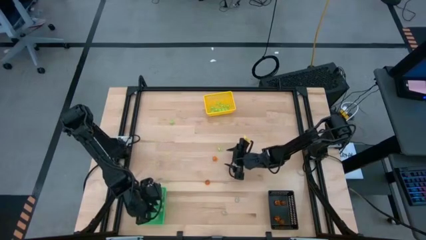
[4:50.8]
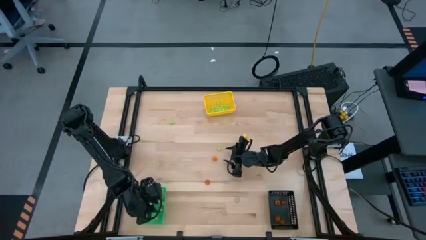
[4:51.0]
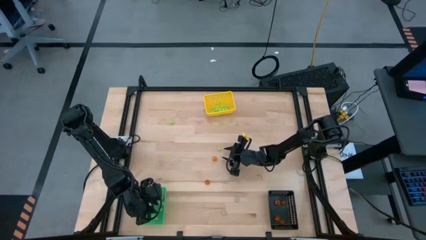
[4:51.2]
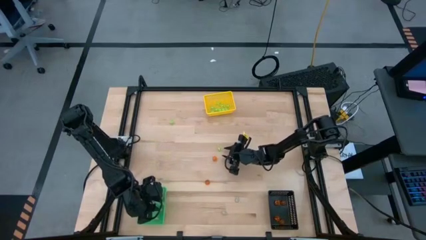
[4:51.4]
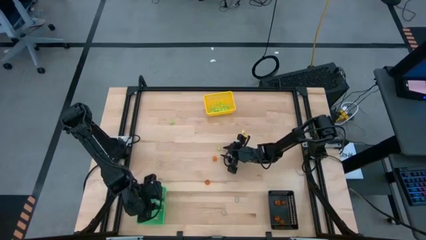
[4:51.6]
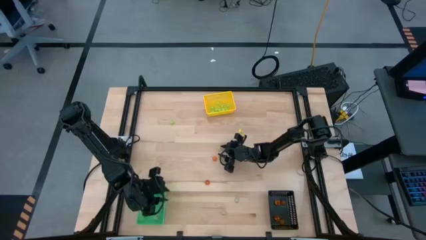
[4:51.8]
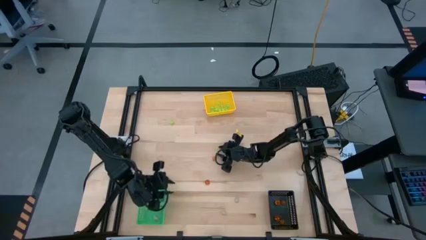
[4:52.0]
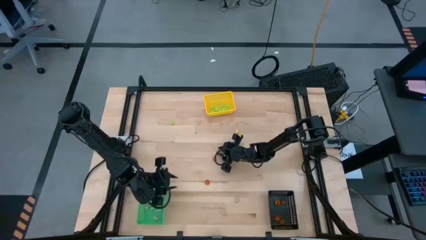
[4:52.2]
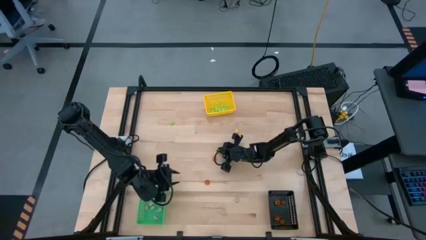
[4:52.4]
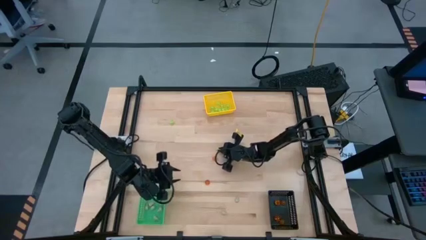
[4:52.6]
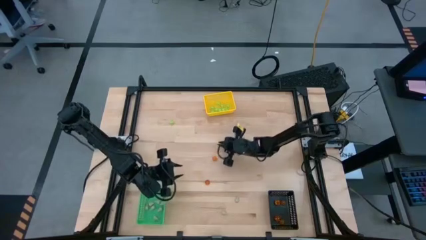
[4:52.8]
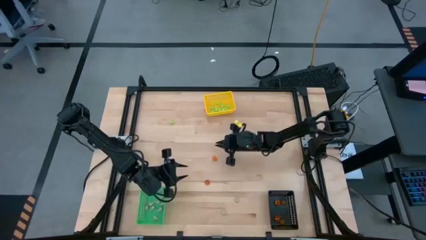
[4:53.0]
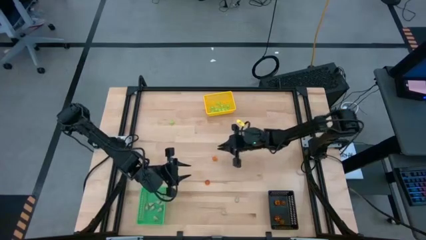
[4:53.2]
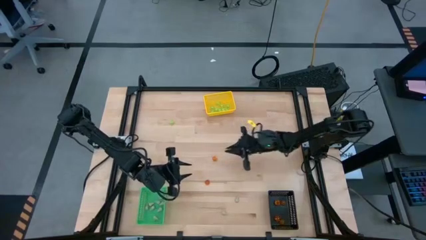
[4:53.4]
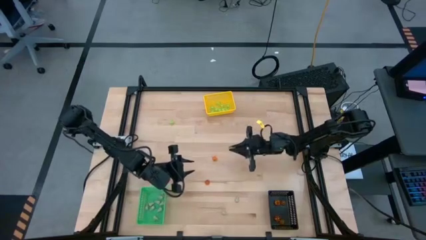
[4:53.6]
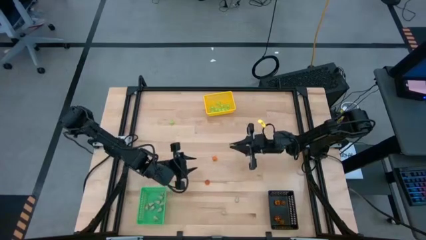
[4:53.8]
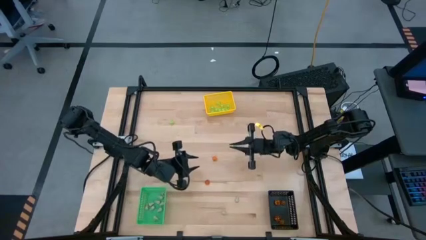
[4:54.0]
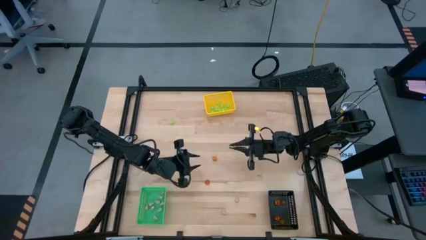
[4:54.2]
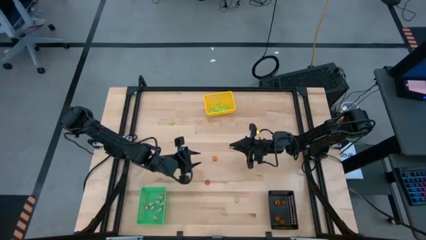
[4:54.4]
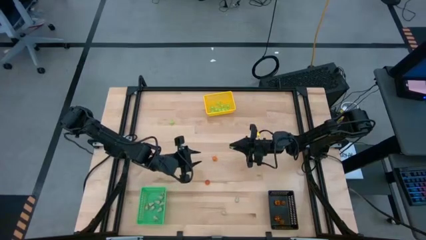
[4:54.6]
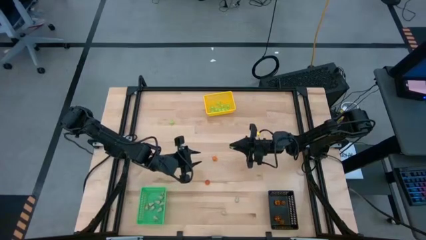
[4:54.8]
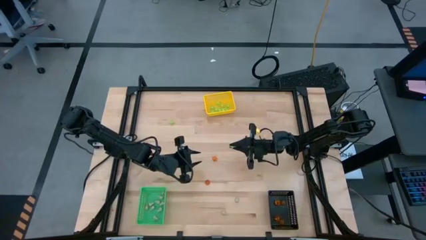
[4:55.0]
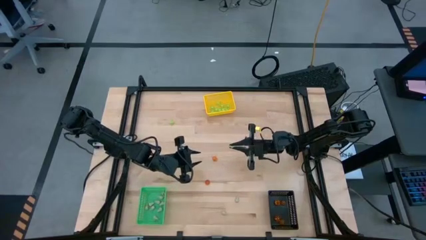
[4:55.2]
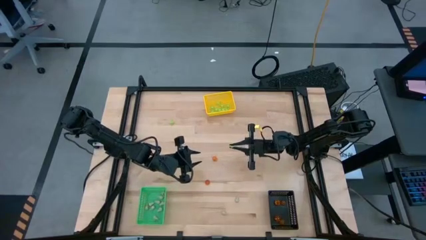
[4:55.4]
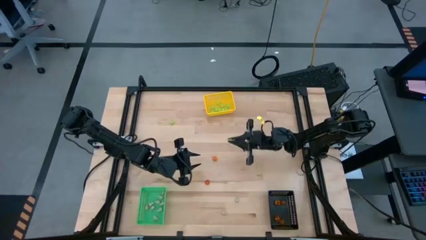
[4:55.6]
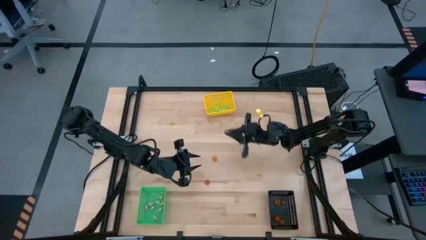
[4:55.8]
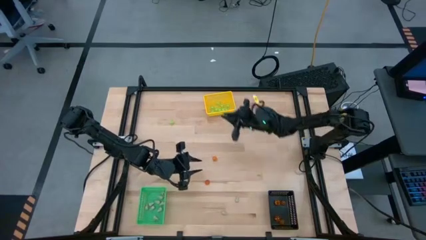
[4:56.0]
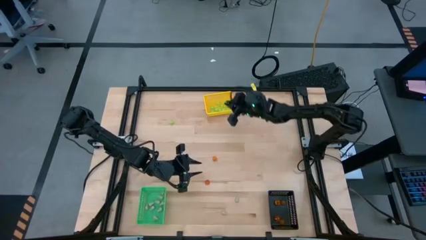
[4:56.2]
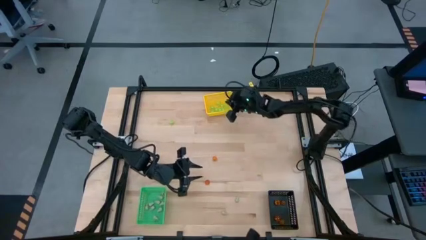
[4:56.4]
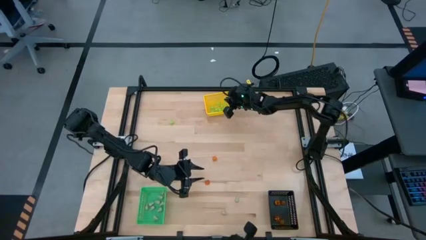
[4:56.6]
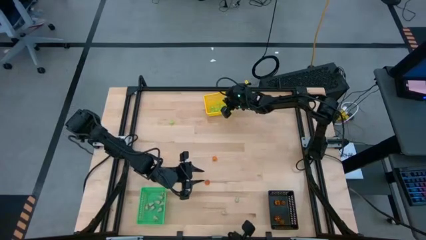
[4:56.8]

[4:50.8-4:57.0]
Task: Sort Halloween decoration
Put the green spider toy into the yellow bin

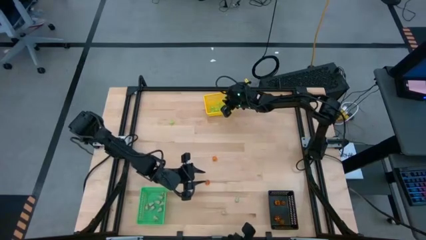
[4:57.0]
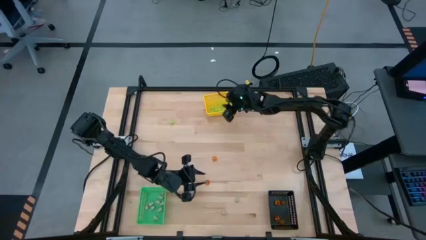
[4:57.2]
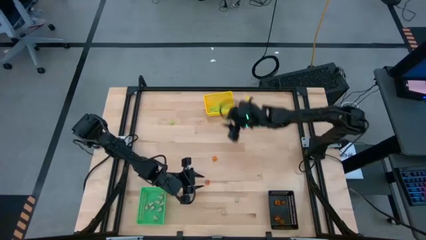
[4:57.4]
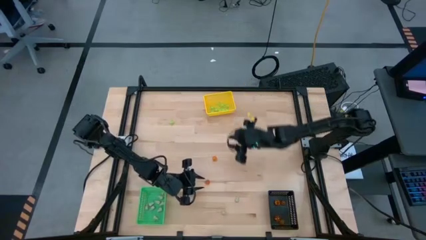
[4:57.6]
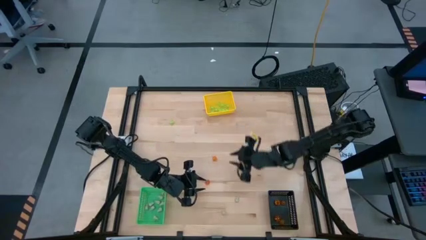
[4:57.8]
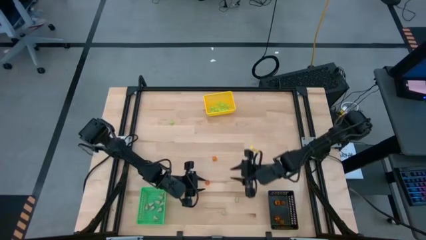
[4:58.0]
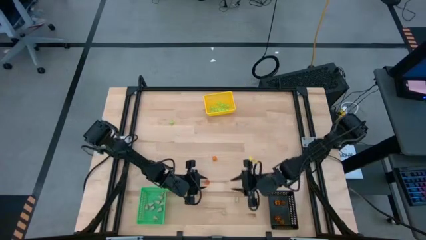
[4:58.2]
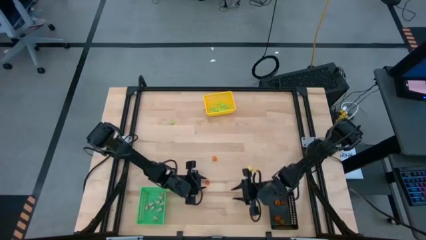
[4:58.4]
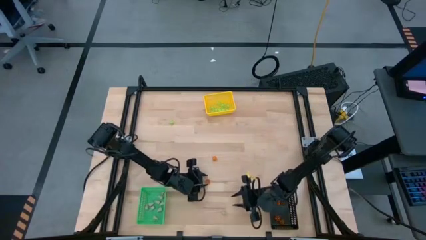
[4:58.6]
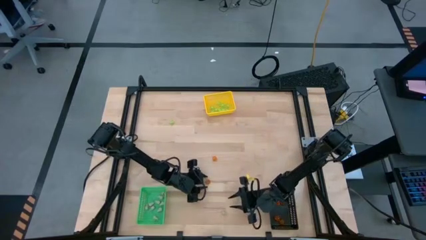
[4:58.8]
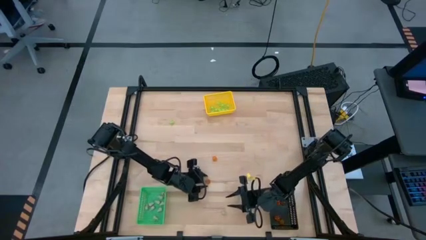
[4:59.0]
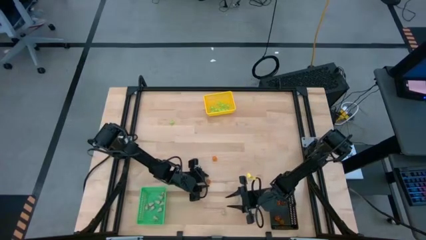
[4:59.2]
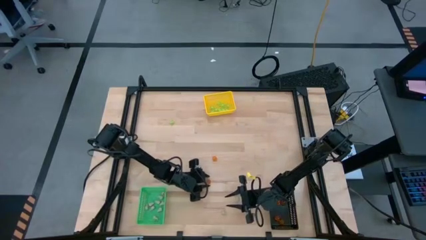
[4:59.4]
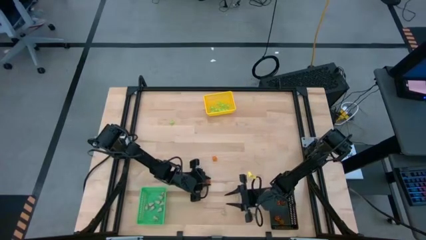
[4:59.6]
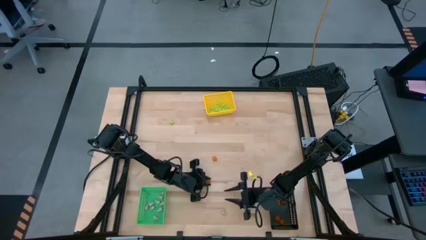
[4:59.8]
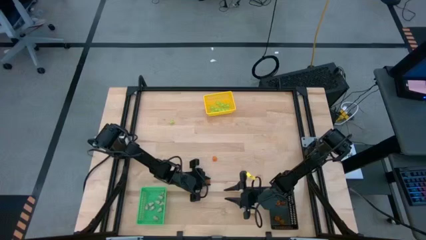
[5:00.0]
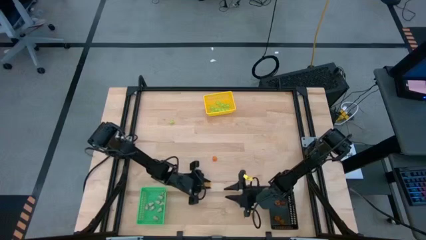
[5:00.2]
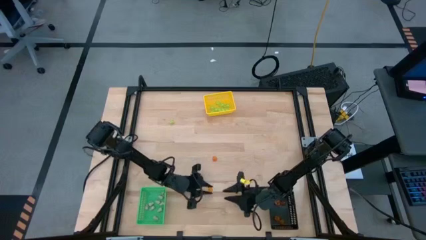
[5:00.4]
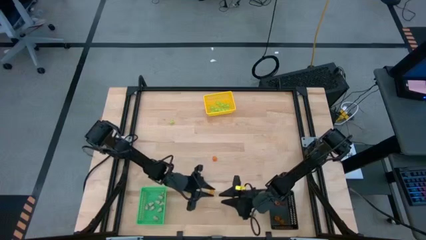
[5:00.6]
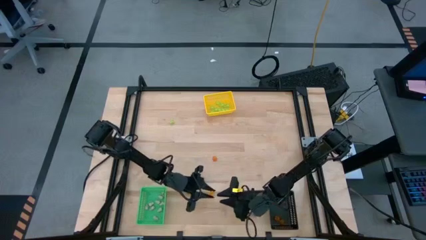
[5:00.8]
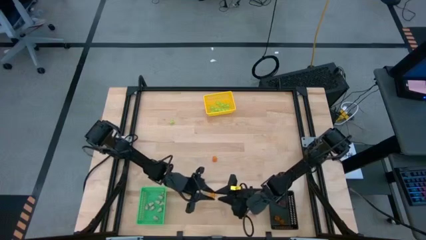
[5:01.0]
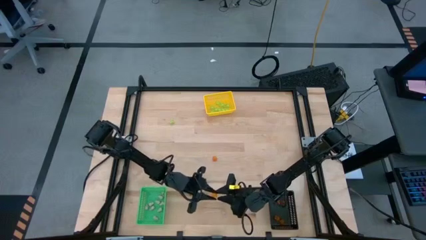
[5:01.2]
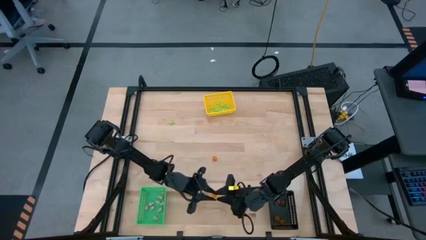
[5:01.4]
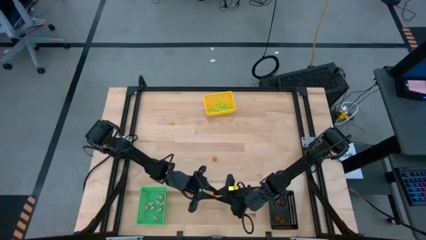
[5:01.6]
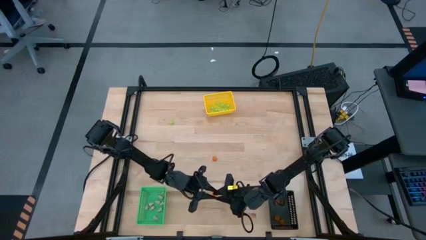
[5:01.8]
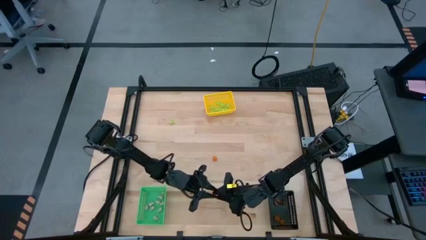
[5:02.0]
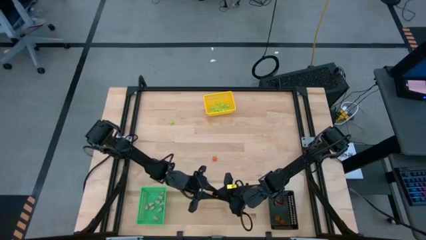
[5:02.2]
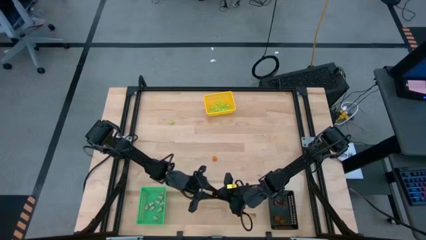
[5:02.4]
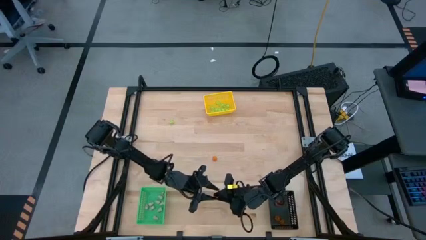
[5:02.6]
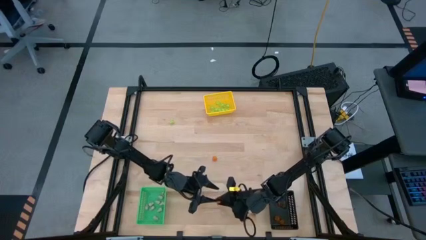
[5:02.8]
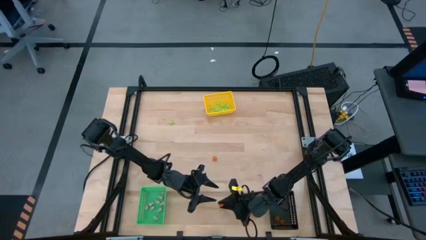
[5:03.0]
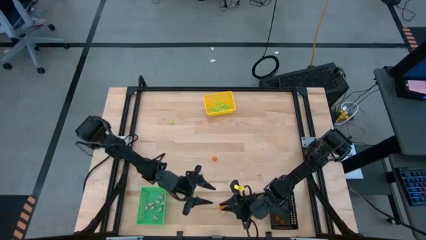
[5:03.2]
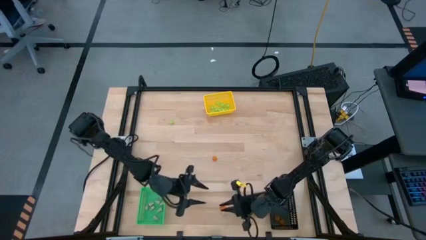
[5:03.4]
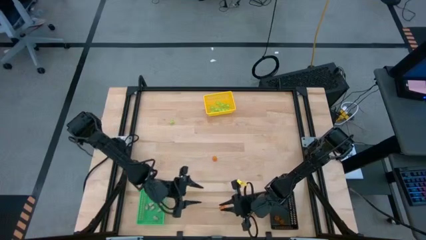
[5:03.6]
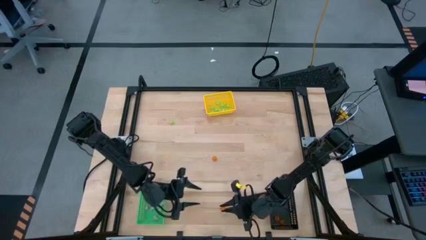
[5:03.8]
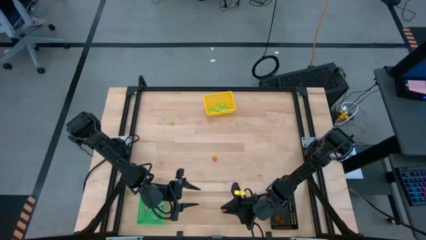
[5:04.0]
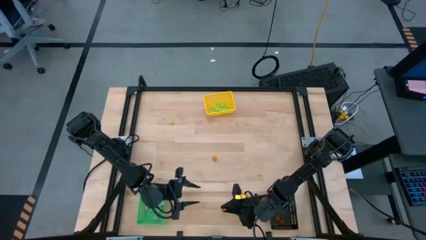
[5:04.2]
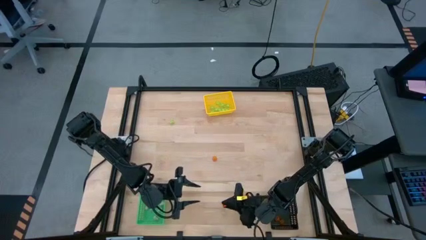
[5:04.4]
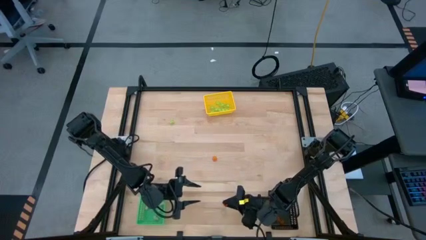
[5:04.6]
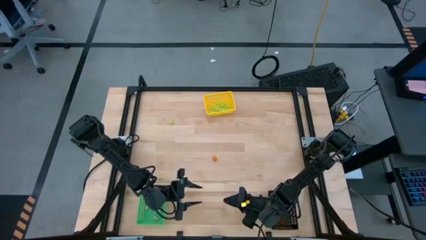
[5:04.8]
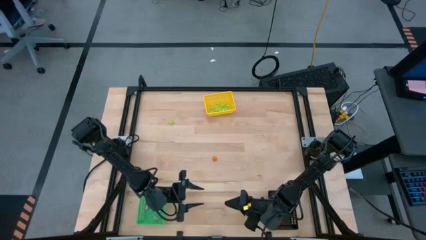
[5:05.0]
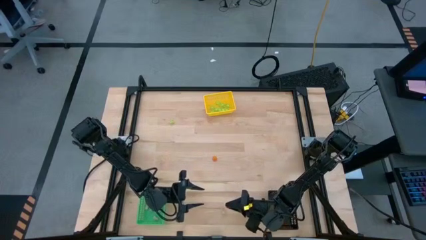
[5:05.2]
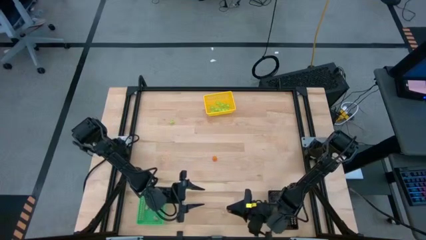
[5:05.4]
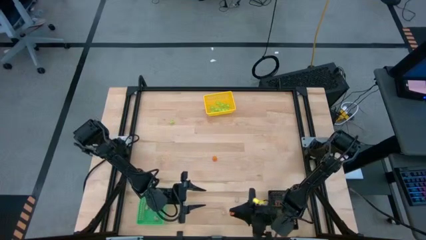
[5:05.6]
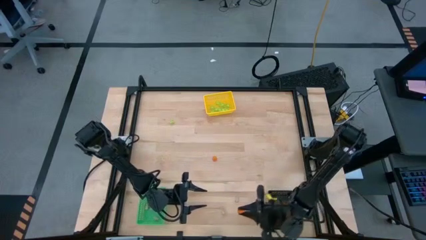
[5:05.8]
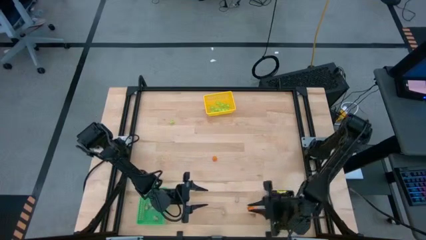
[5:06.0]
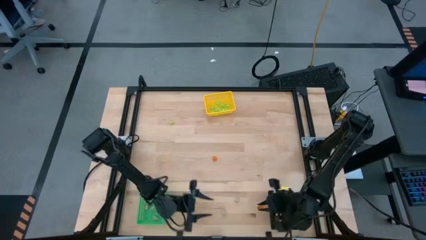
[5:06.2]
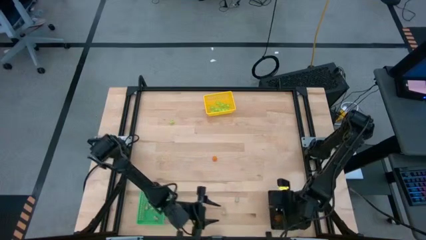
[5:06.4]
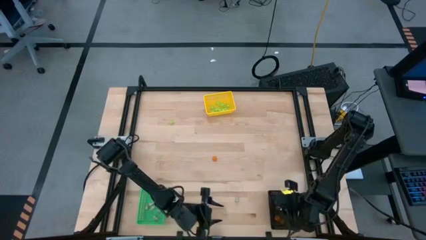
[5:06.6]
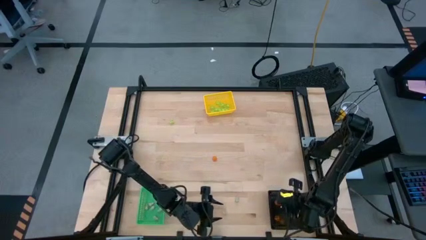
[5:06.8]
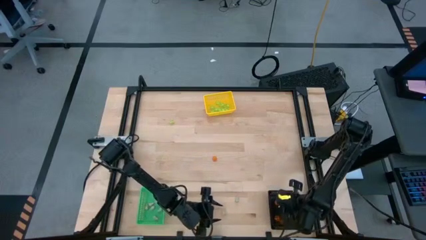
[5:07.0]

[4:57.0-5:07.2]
Put the orange pumpkin toy into the black bin
